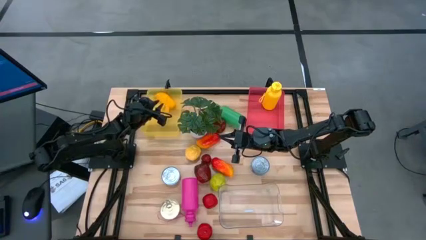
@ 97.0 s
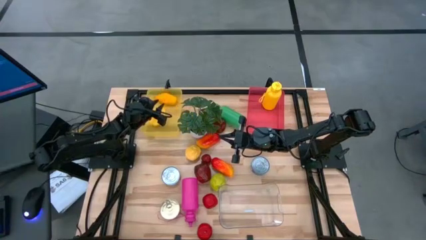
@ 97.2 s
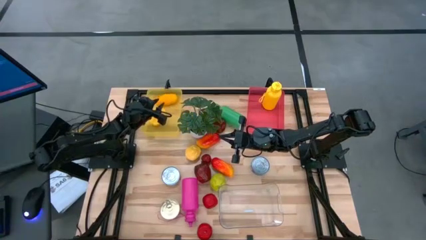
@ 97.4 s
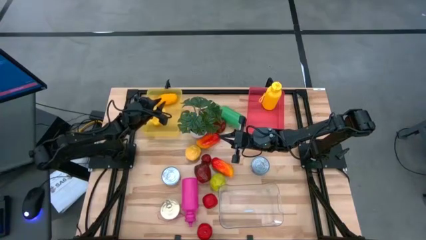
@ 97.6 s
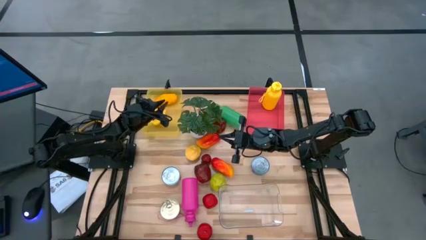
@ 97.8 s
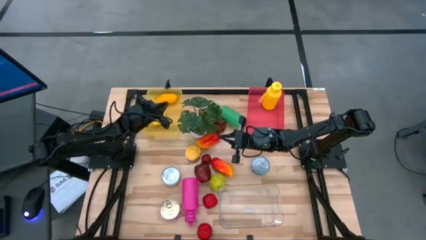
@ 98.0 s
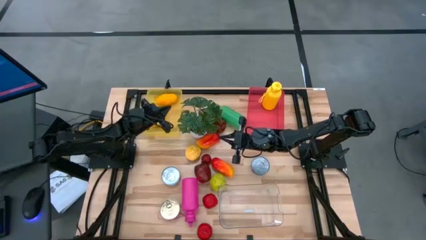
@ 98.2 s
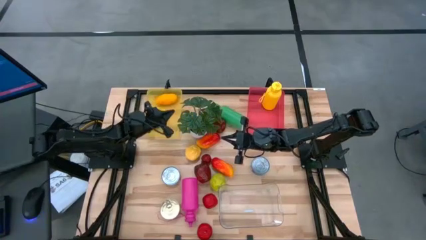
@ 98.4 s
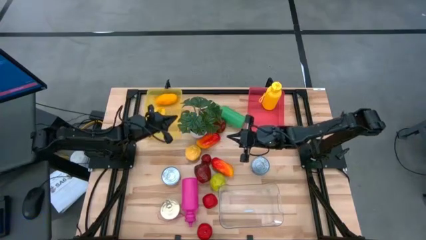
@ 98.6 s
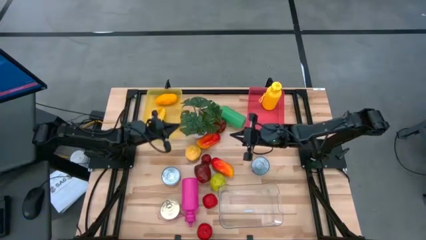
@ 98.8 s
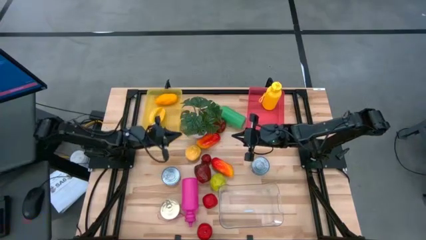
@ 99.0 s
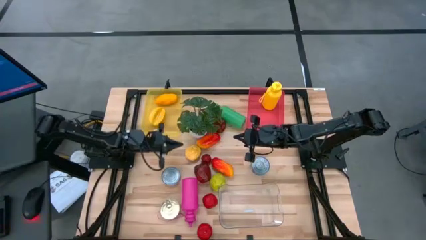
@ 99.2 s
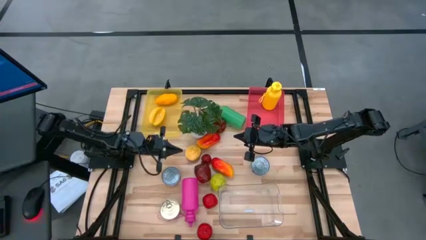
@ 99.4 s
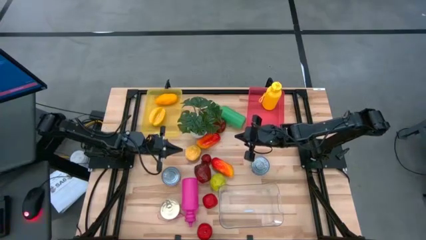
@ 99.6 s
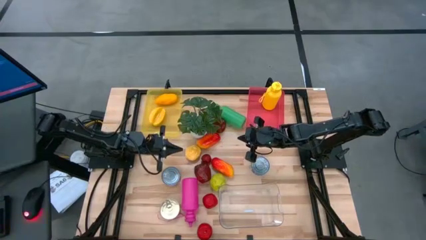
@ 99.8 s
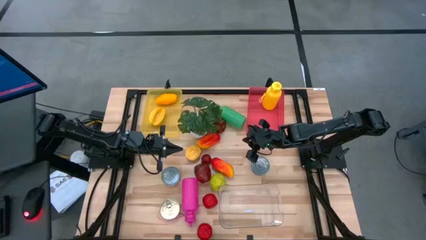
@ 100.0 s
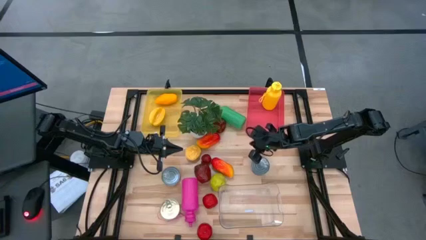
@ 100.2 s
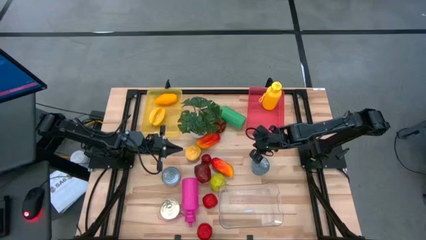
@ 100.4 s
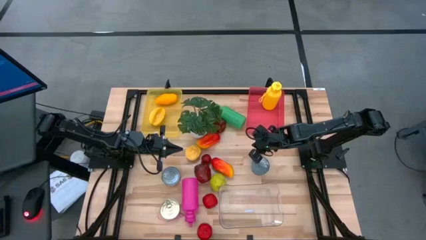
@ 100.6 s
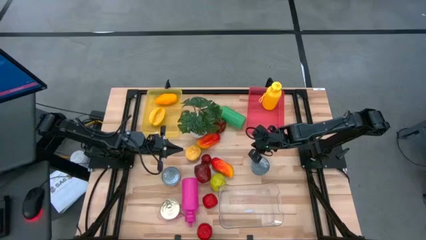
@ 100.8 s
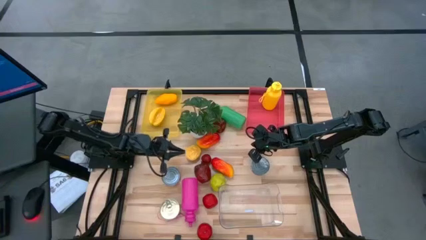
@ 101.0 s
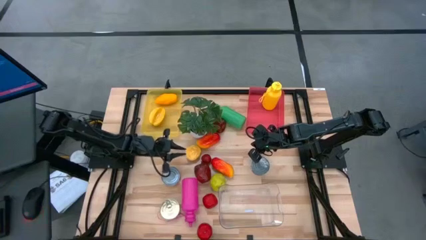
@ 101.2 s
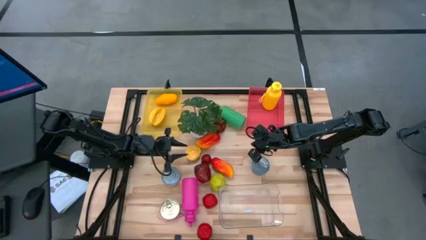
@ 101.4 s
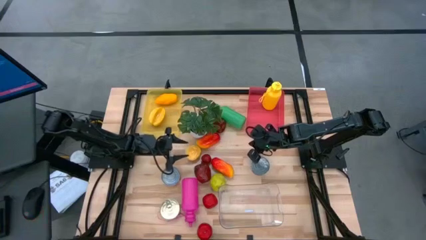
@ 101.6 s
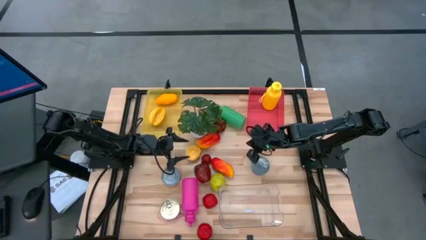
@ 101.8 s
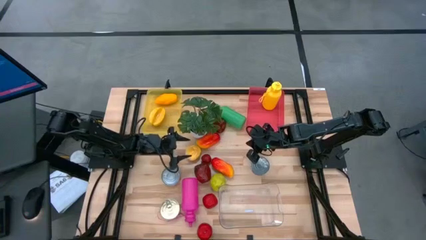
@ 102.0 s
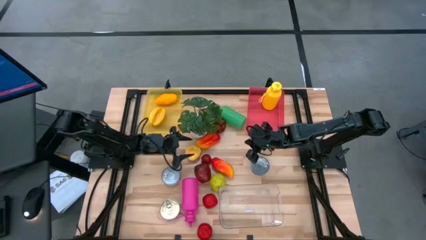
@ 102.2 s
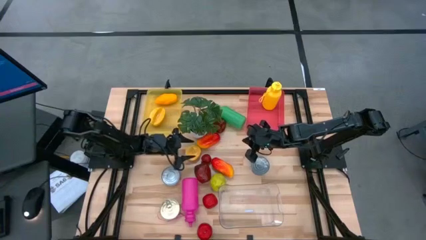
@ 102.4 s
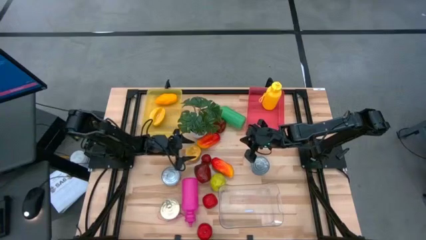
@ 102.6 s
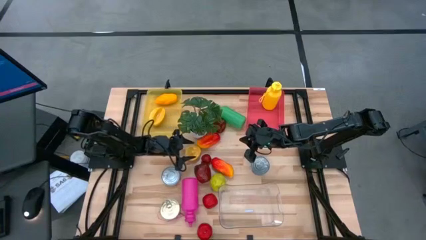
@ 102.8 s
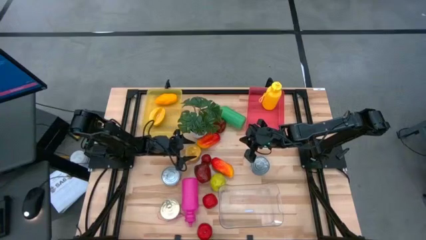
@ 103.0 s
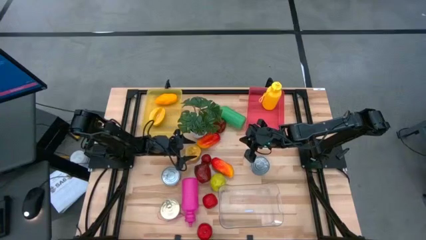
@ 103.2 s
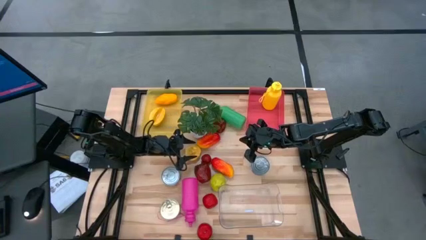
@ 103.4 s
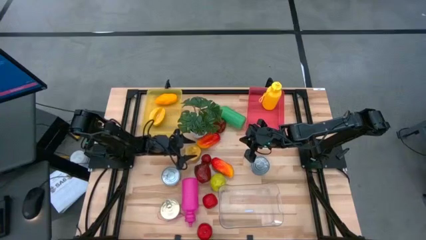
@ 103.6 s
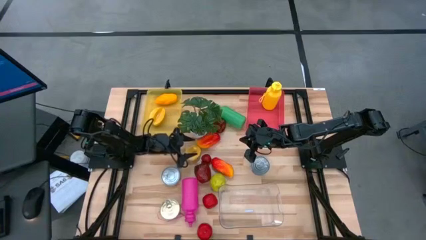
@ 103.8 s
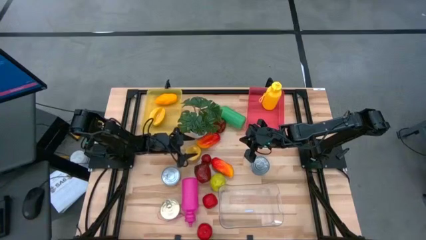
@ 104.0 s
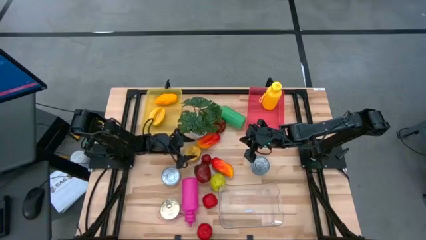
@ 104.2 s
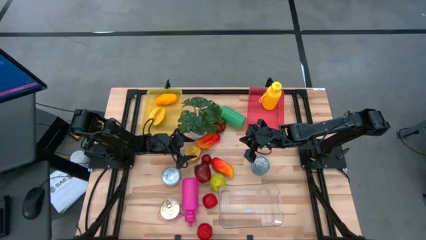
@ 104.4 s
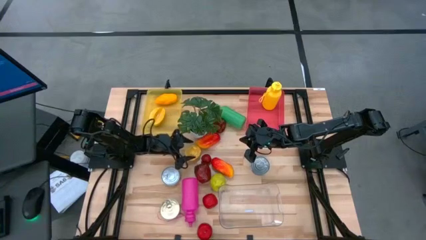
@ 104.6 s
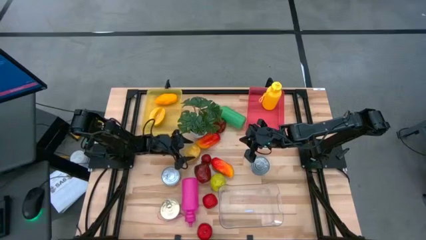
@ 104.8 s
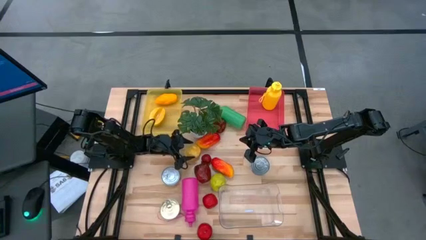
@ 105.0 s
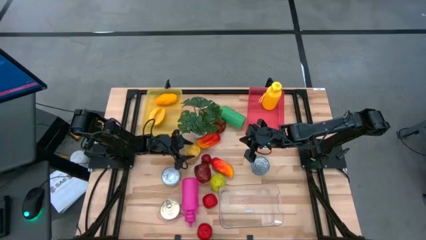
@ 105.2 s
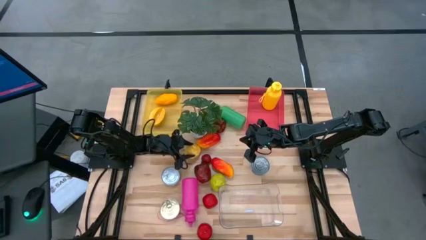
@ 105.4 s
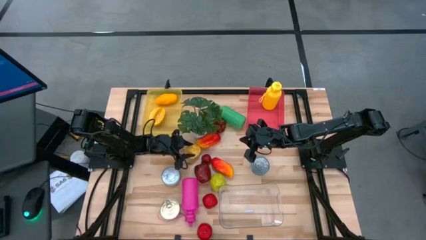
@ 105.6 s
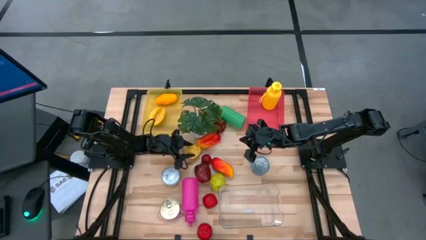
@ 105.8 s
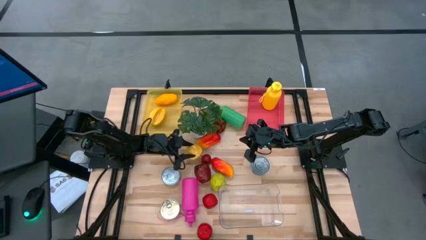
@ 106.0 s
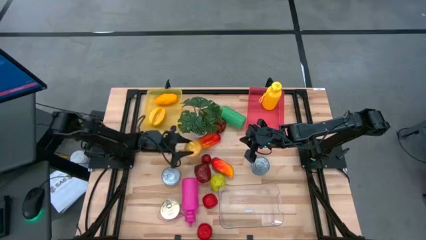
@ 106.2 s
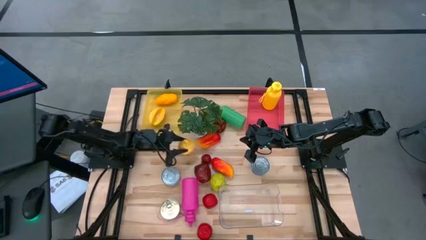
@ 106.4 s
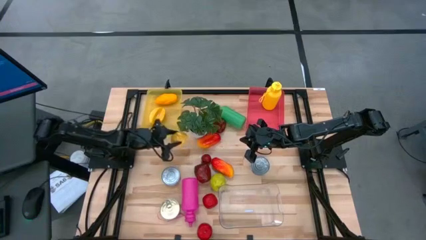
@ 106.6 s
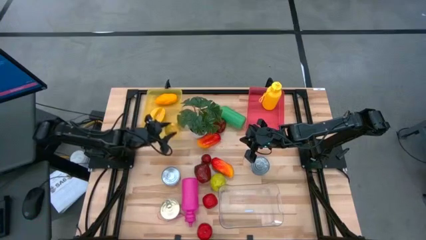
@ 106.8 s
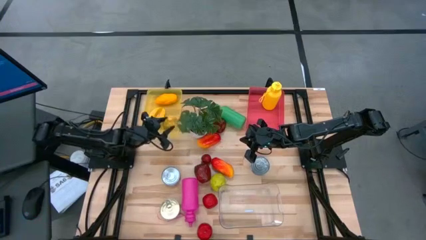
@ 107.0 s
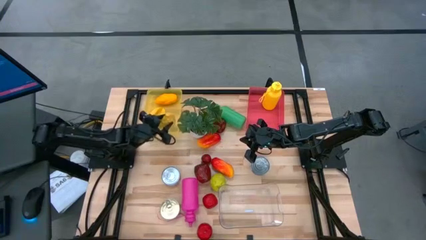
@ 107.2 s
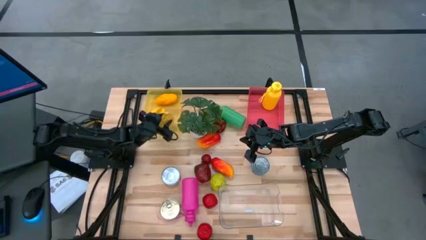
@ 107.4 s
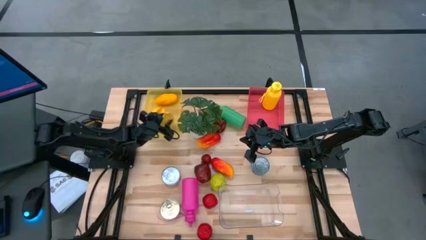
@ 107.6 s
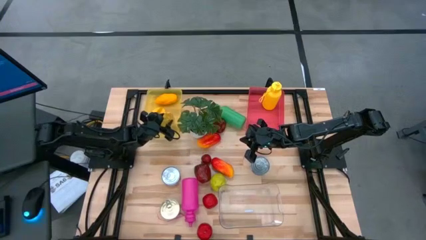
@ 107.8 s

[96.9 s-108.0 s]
Task: Pick & Place Food Item
Put the yellow pear into the yellow bin

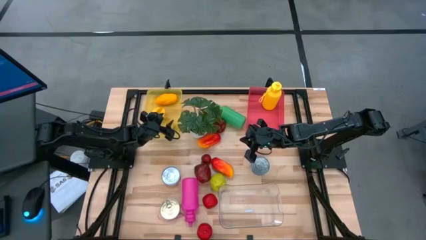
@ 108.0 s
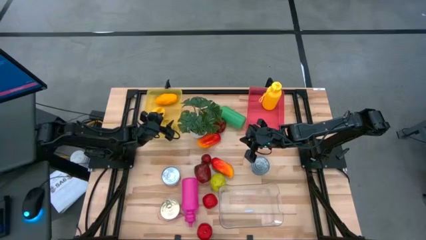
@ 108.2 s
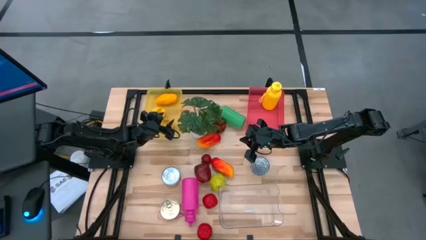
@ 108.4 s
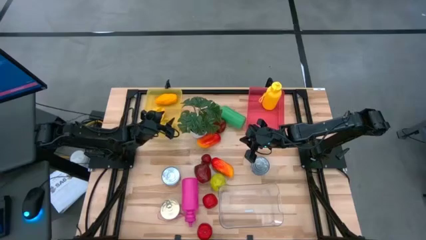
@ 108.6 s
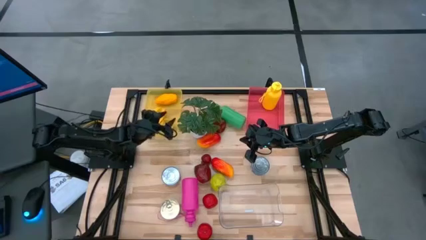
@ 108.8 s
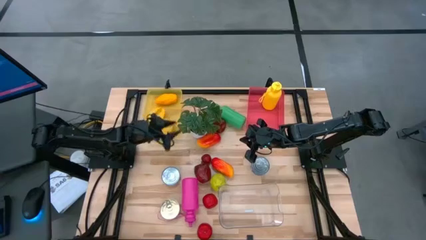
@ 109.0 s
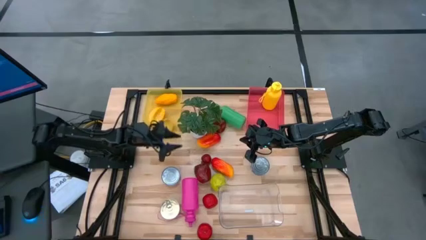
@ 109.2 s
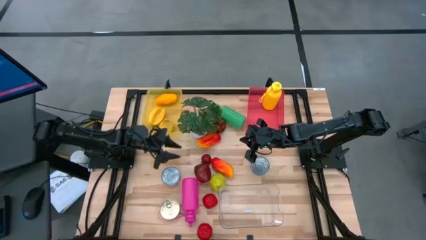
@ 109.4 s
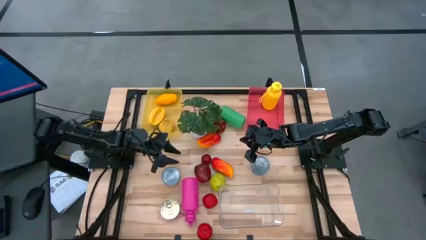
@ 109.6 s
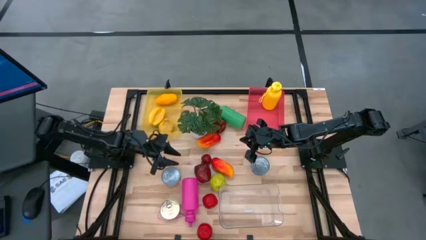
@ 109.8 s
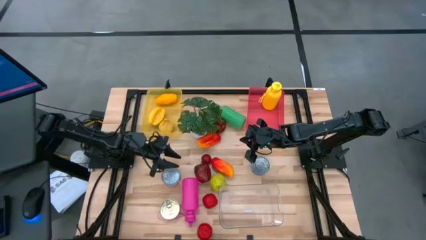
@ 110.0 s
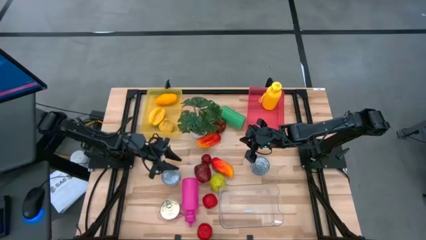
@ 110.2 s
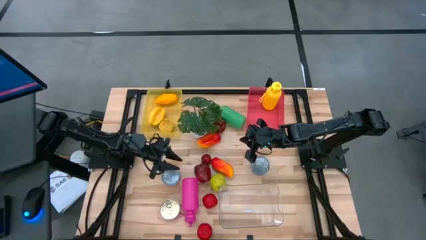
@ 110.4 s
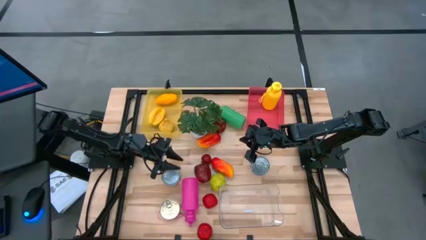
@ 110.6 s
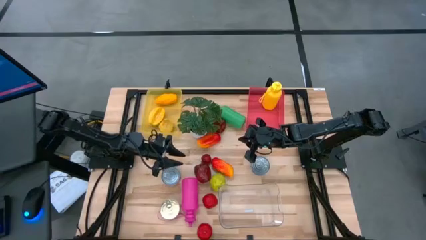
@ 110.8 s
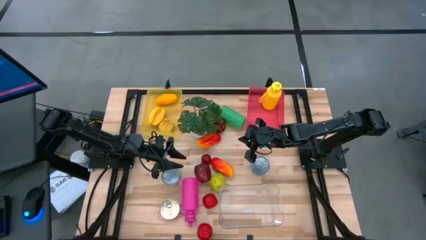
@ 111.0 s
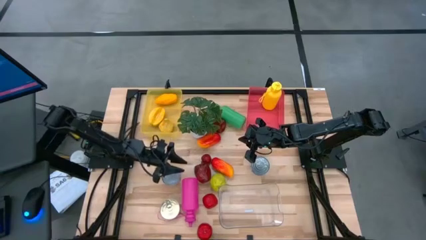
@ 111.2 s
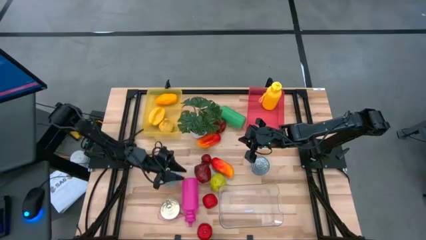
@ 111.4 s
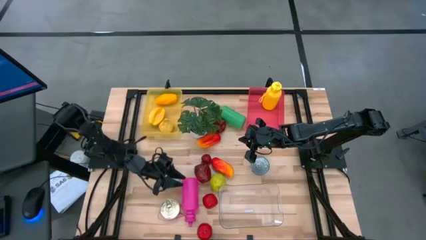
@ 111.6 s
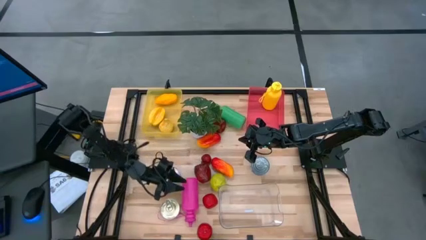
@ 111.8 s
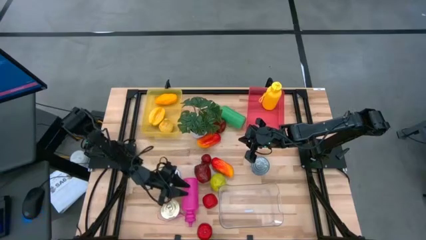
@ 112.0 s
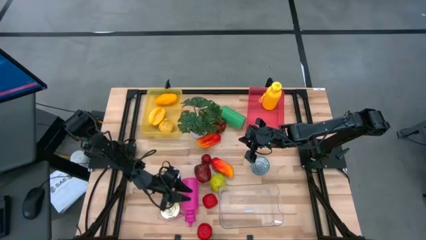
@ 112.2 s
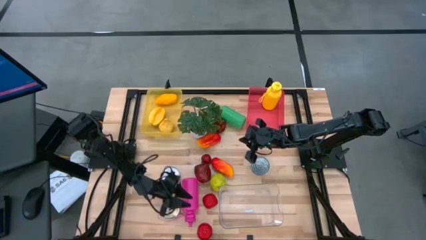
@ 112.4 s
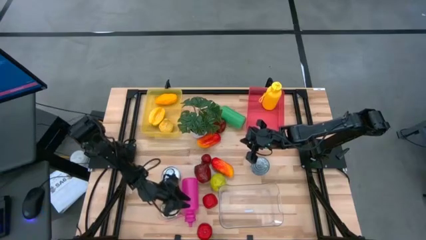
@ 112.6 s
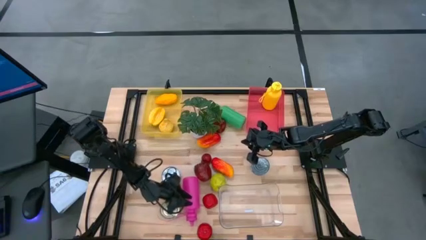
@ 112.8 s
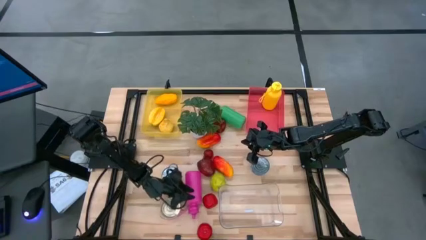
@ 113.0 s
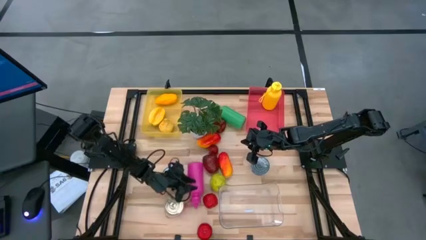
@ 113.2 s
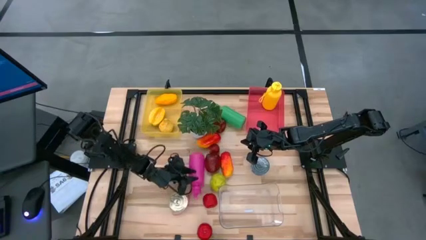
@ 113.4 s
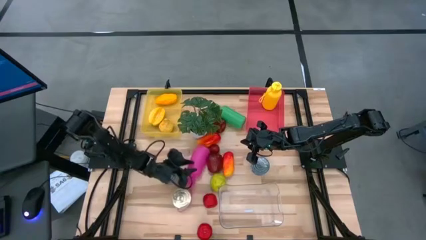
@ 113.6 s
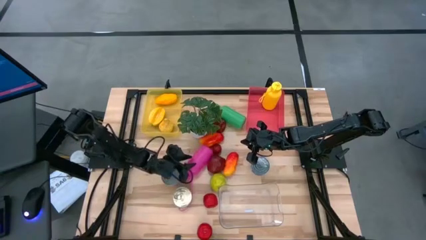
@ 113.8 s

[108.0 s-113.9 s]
Adjust the pink water bottle
